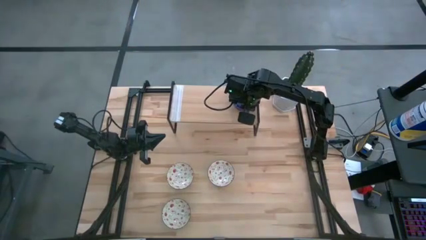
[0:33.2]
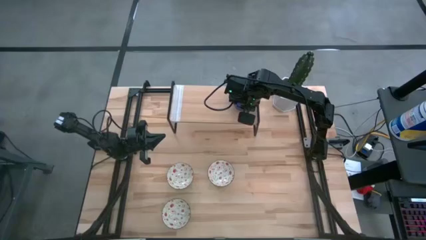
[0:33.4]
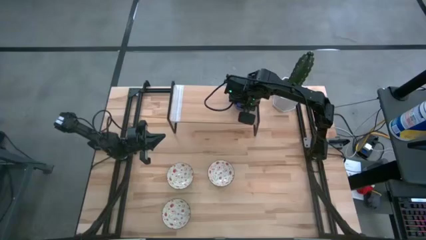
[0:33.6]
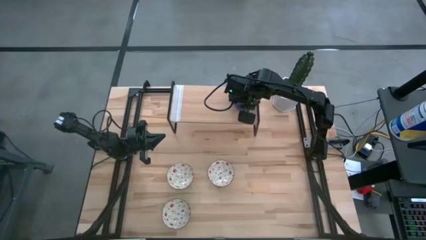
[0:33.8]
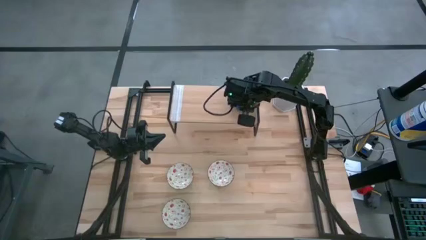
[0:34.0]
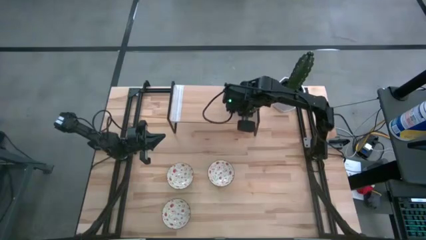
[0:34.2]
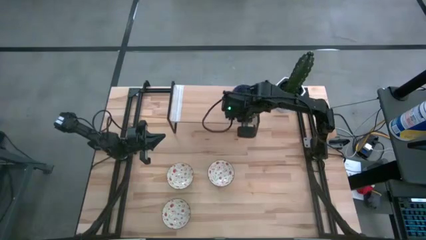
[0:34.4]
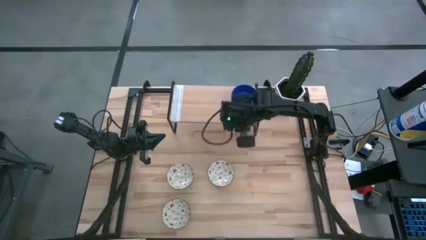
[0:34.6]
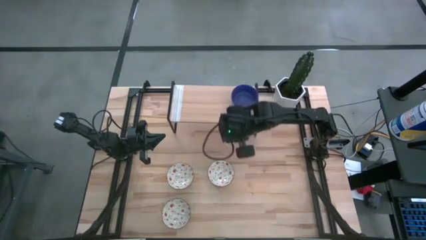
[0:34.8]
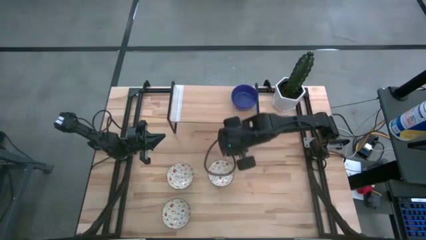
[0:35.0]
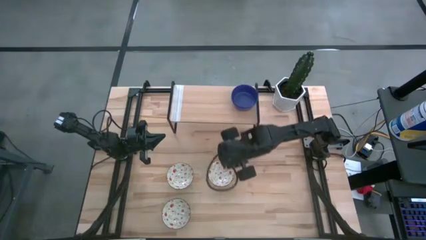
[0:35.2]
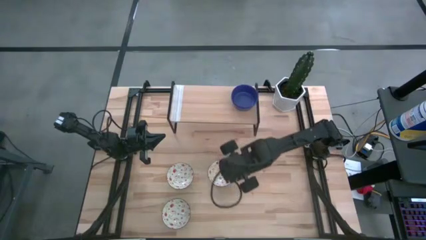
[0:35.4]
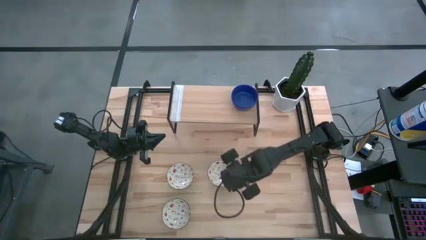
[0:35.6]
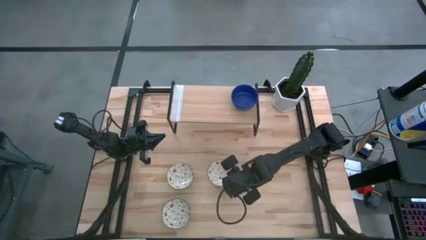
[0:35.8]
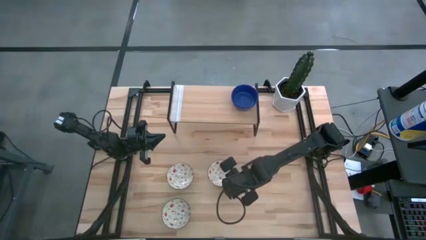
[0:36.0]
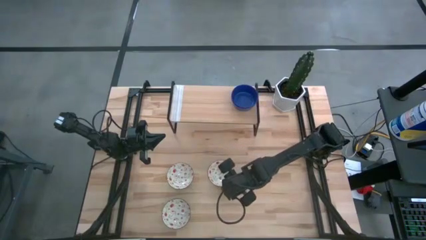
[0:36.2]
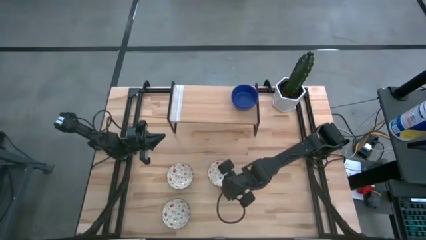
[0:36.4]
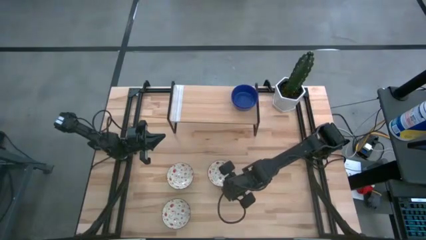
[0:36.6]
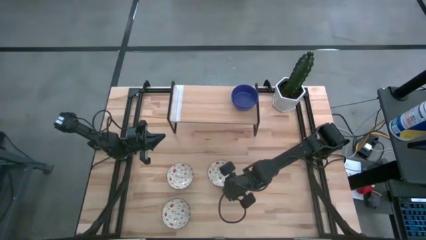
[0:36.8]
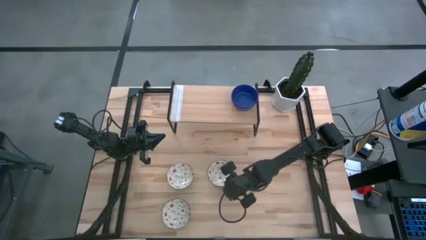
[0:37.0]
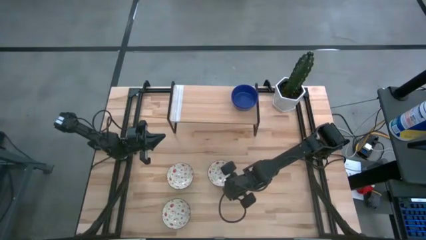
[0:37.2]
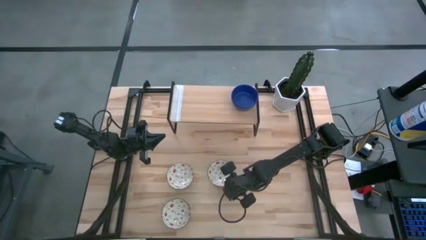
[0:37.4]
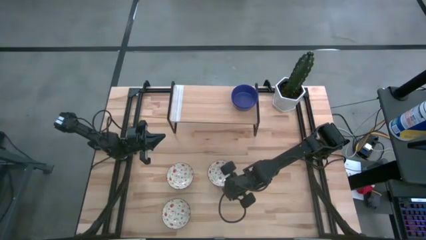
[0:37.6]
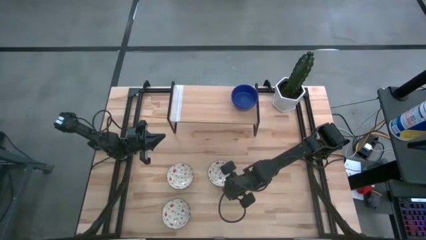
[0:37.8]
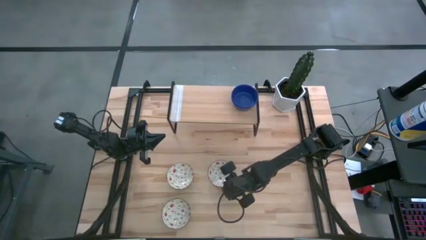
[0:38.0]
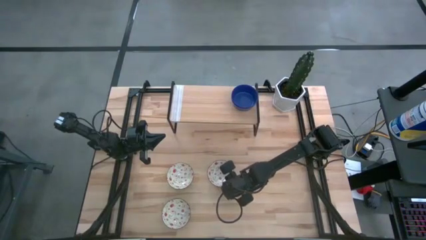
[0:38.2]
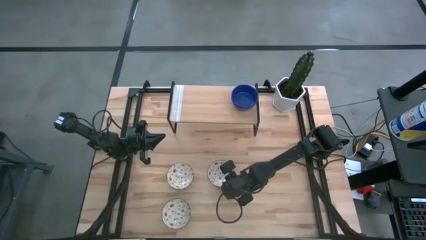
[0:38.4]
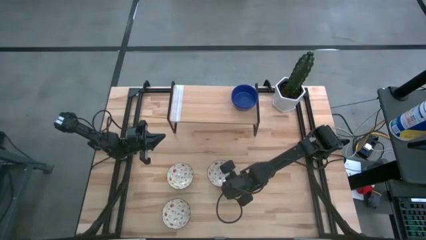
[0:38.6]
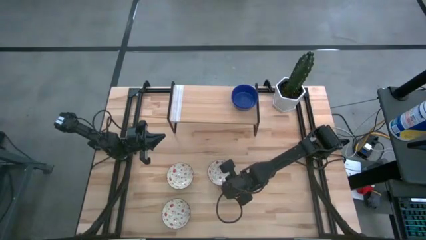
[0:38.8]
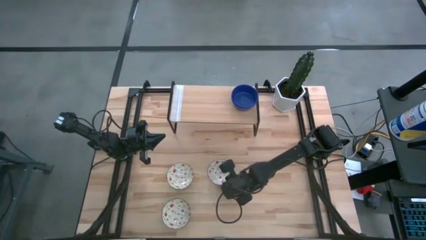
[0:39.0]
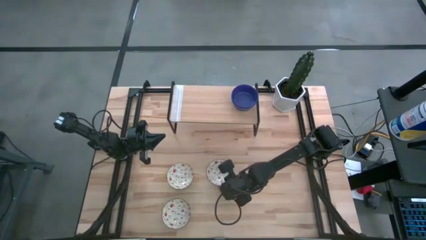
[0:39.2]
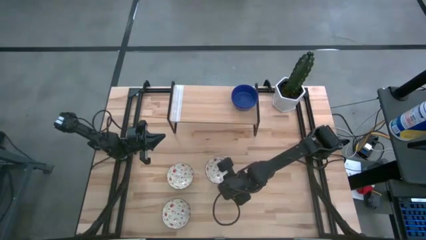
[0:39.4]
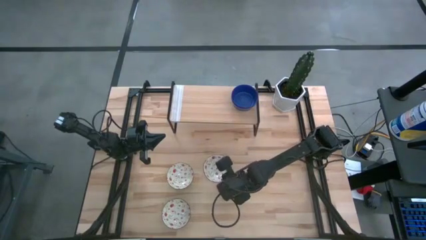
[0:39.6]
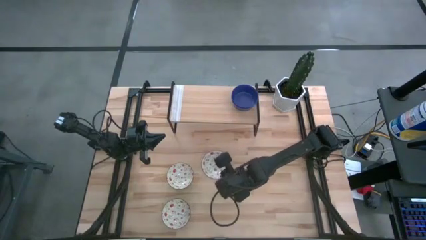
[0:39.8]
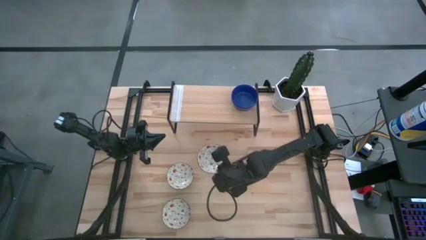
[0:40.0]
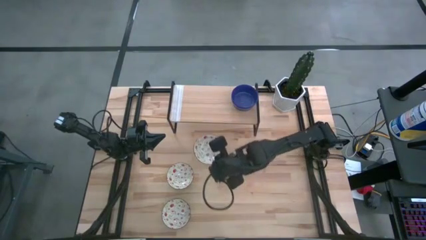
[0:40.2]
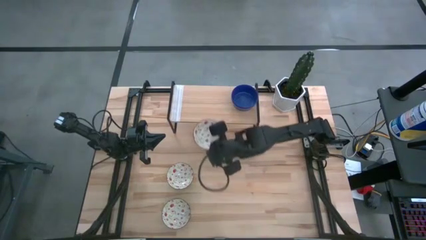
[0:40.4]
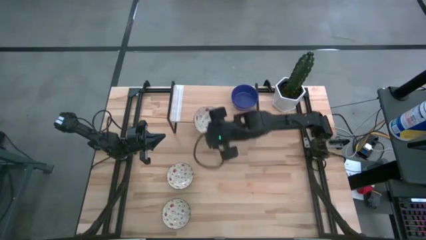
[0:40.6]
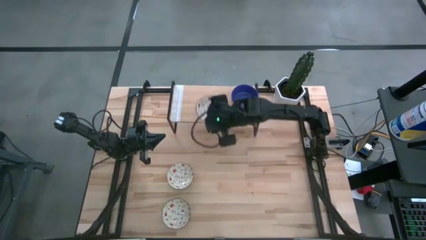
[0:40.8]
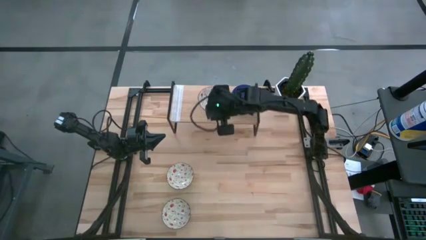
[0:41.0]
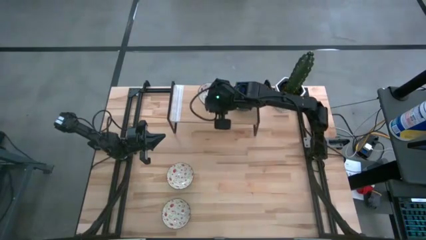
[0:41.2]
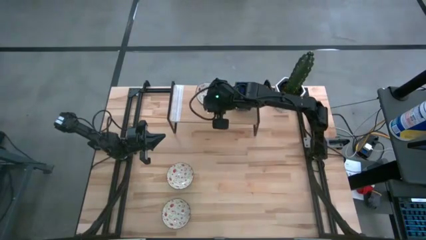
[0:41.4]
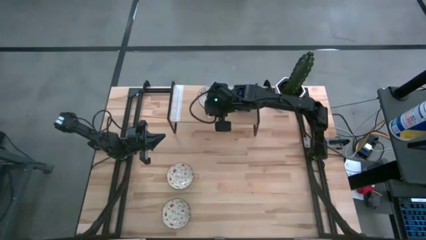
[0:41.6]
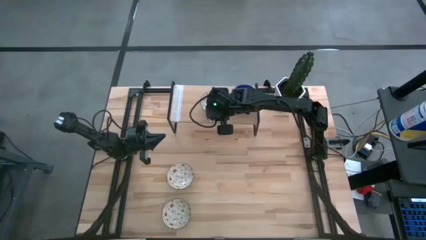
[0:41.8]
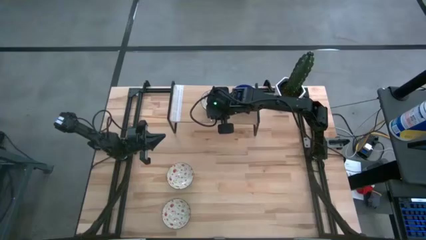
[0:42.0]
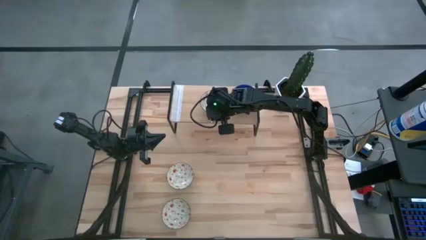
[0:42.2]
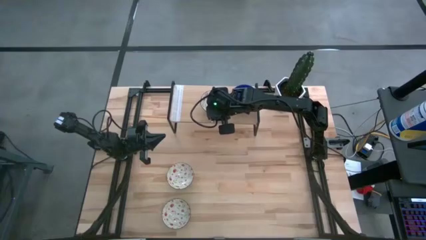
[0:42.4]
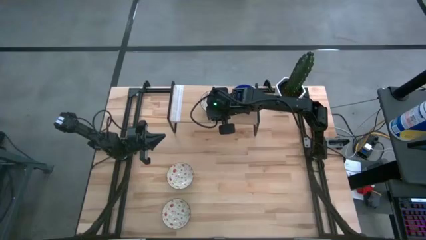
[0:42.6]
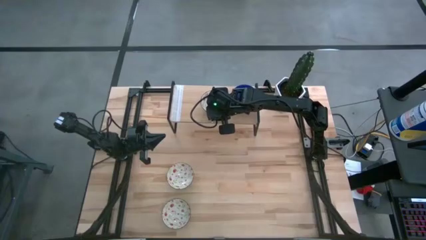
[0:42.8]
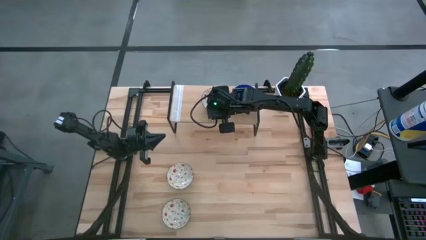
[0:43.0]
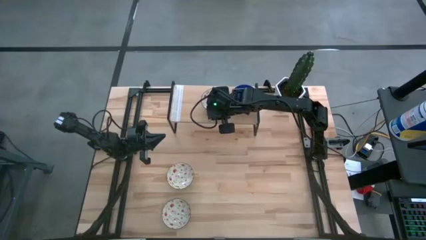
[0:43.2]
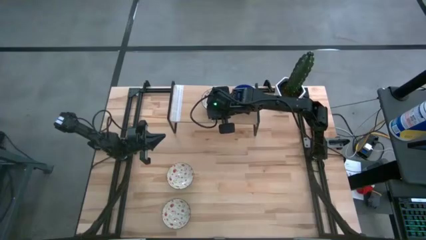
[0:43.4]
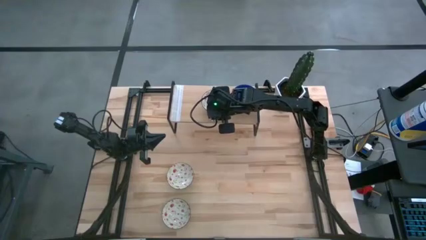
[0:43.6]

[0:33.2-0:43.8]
Task: Pick & Place Mini bowls
Put the top right green patterned bowl on the shelf

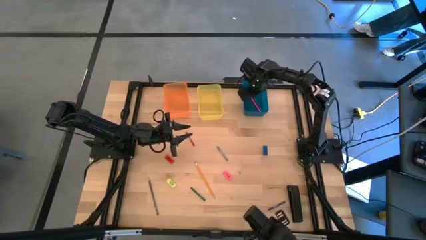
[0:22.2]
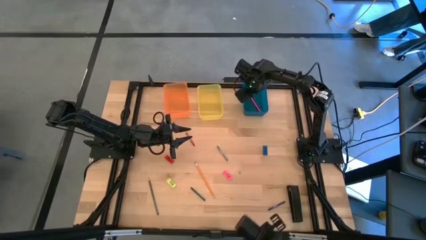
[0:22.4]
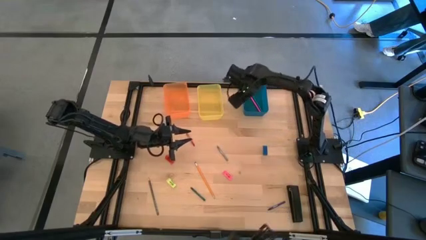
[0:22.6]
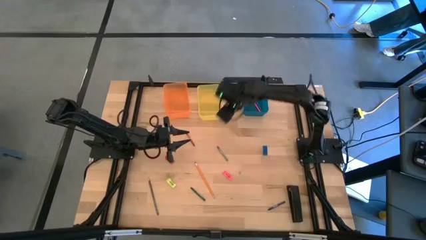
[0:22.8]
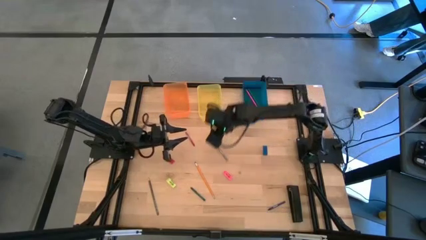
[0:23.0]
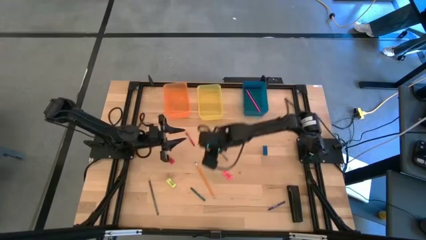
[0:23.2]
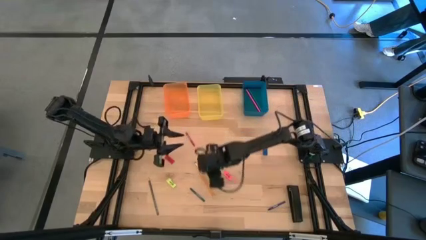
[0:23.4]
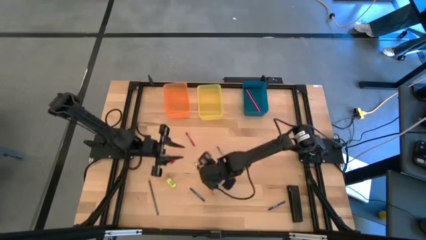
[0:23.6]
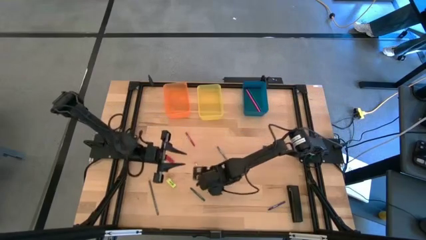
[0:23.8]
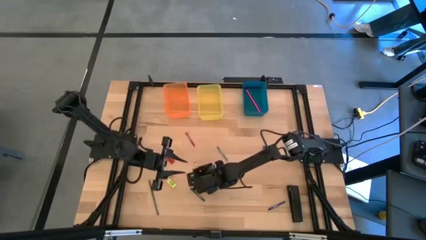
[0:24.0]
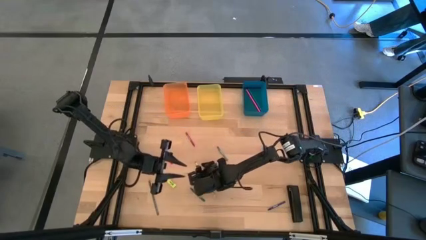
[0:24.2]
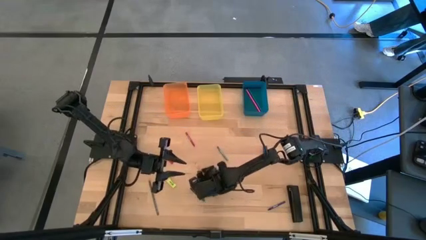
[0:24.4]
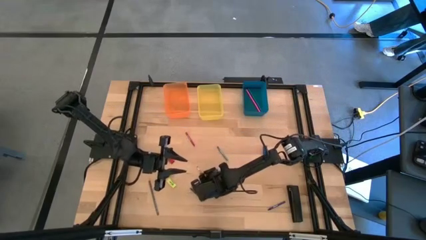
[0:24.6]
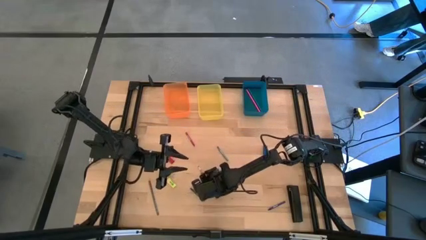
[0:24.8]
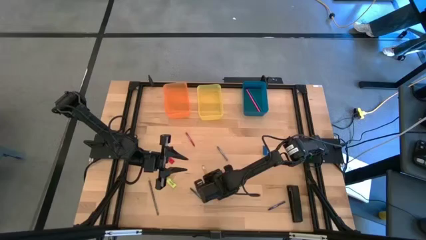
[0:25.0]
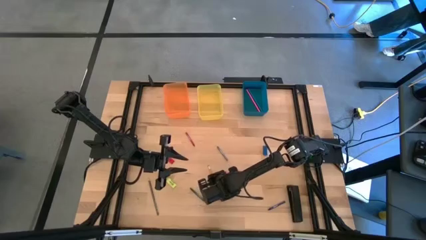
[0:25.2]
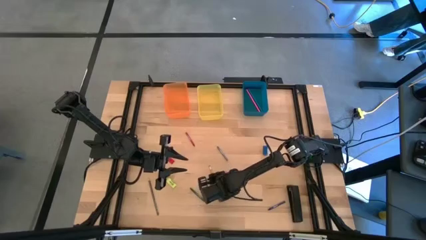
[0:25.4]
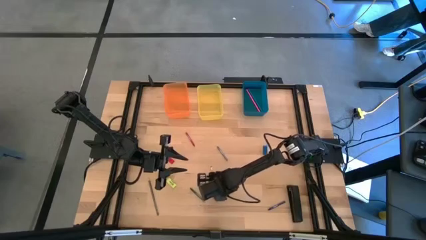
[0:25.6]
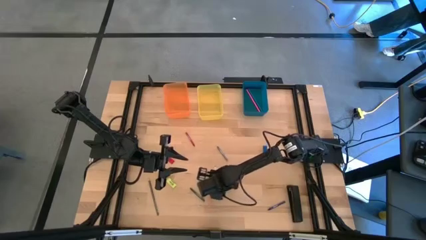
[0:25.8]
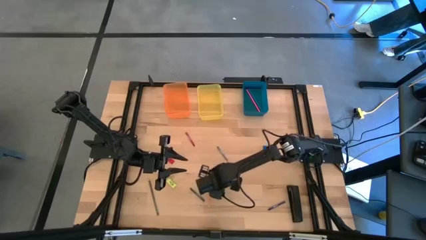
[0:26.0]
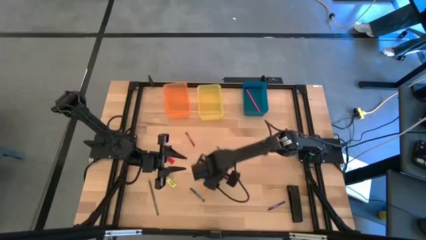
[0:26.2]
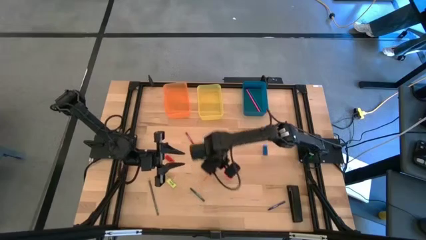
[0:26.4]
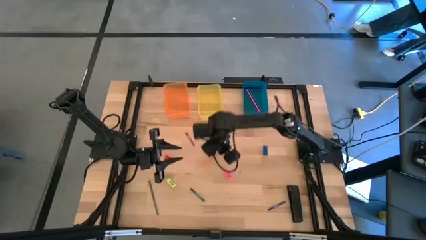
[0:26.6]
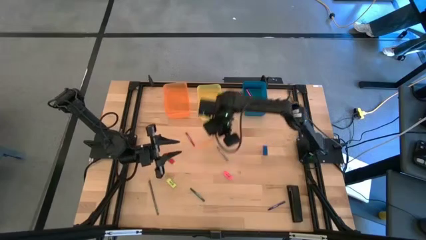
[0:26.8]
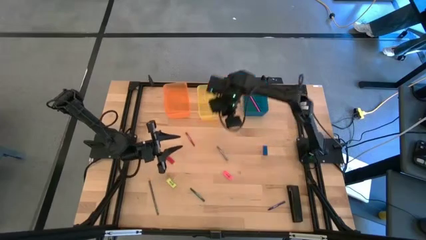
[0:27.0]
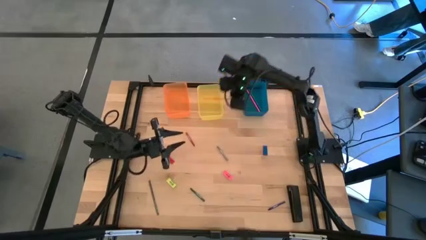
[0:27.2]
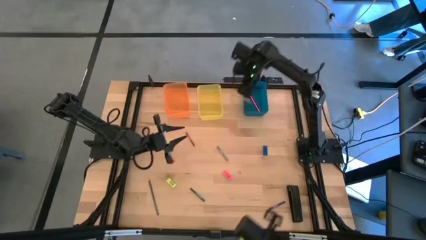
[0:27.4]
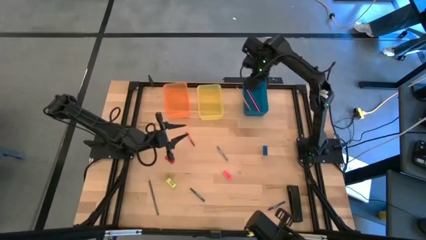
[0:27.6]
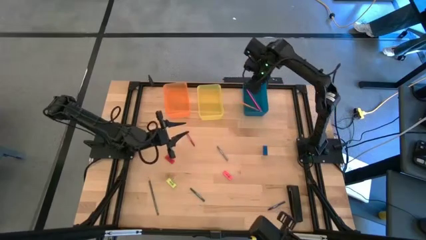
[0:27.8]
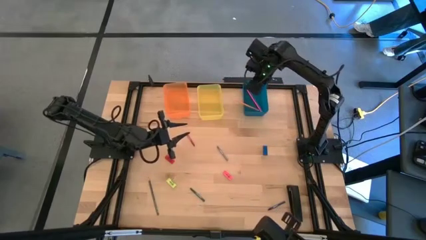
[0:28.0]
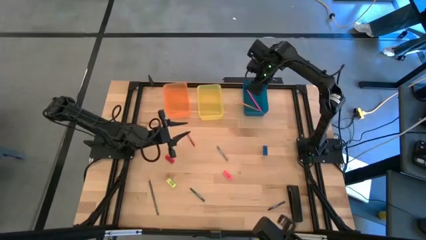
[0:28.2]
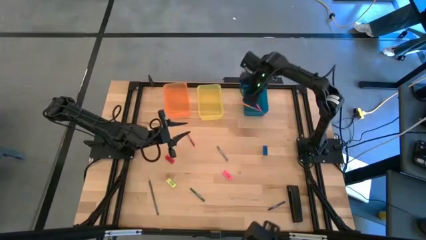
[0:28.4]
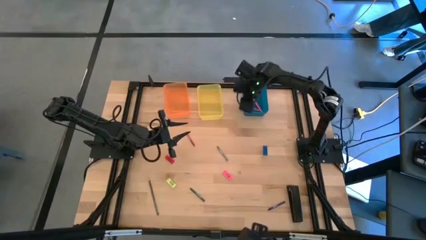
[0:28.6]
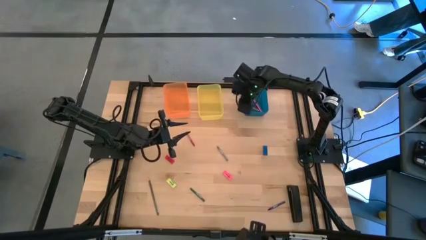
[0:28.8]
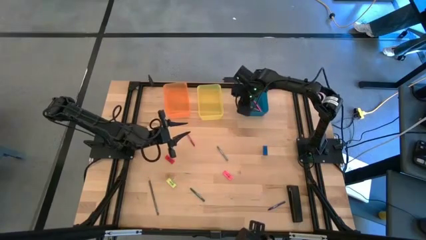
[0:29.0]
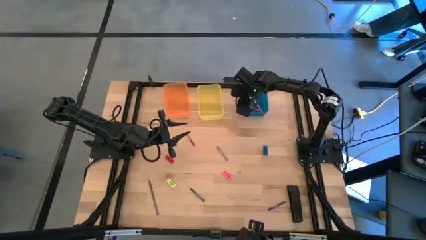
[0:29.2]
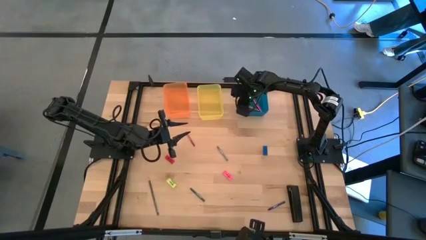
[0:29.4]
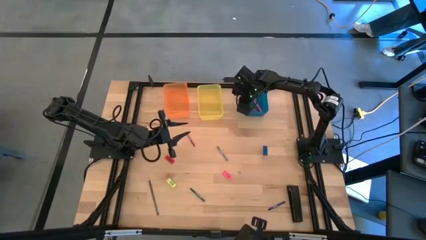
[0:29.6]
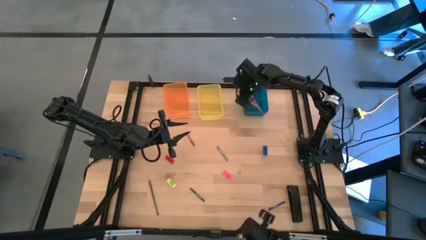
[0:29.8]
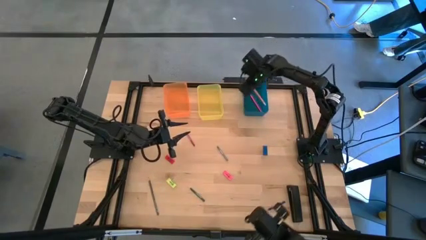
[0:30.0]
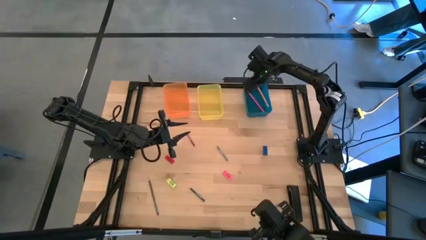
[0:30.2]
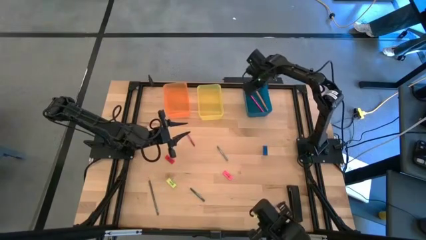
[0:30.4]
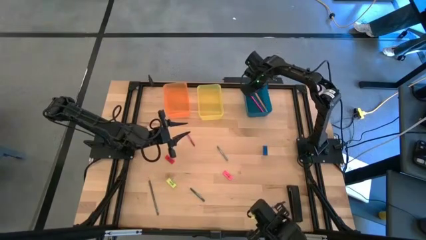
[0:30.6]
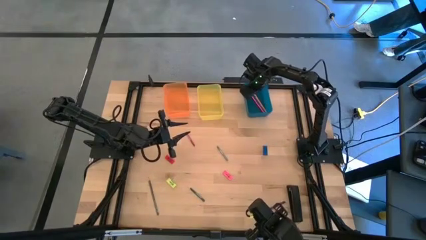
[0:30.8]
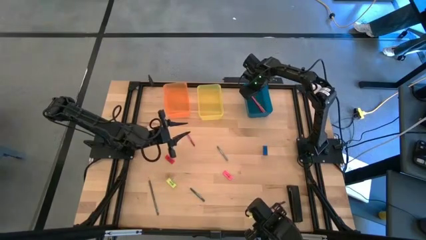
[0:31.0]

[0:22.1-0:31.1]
Task: Sort crayons/erasers/pens/pencils in bins
Put the yellow pencil into the blue bin
